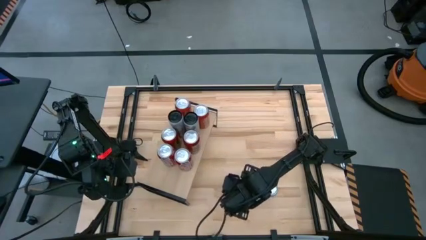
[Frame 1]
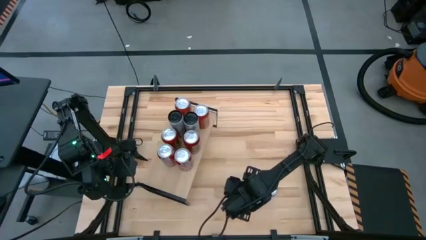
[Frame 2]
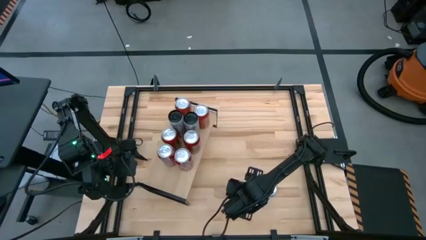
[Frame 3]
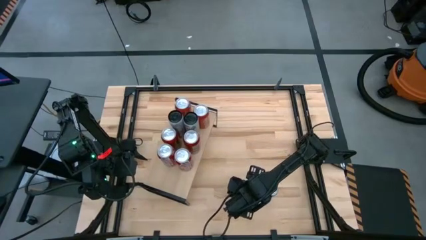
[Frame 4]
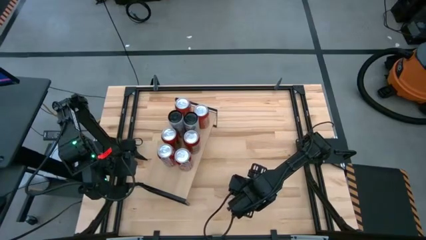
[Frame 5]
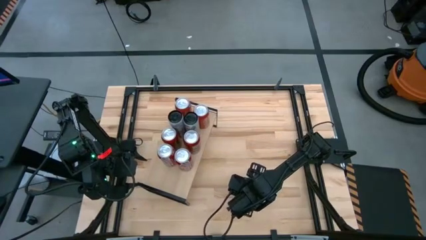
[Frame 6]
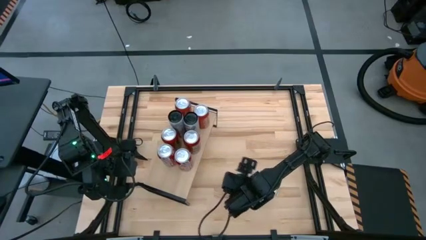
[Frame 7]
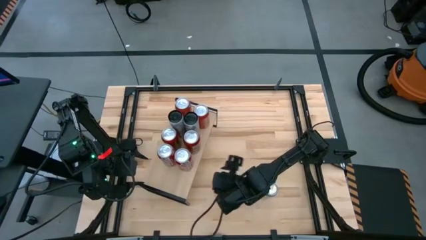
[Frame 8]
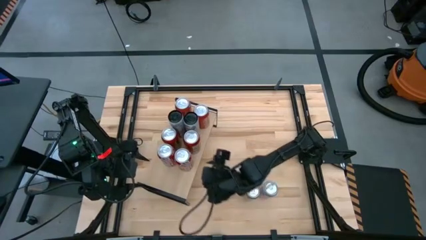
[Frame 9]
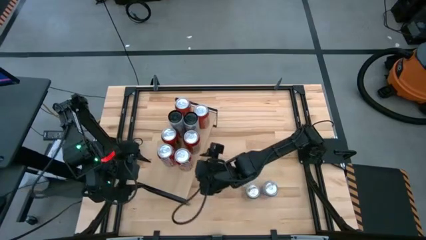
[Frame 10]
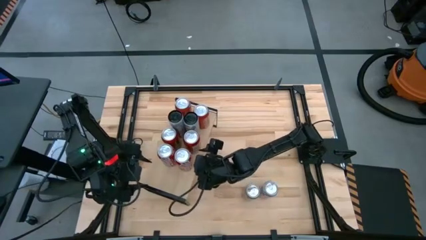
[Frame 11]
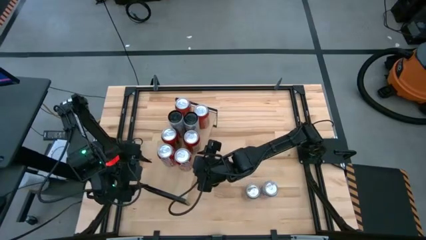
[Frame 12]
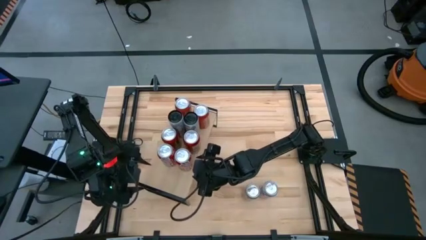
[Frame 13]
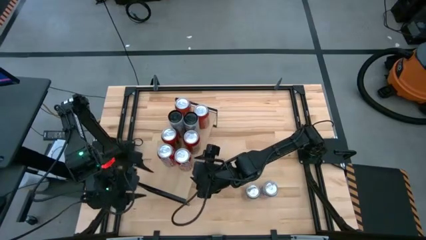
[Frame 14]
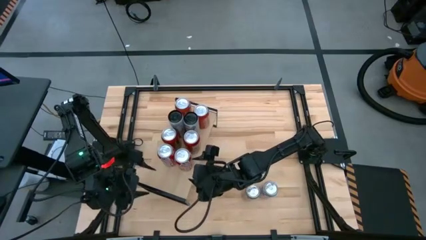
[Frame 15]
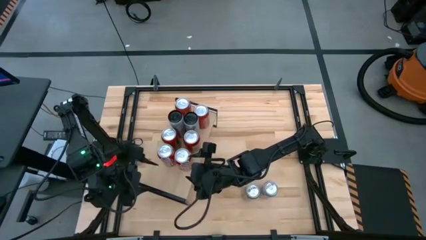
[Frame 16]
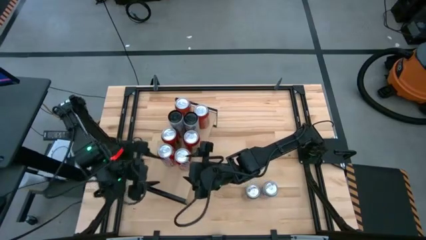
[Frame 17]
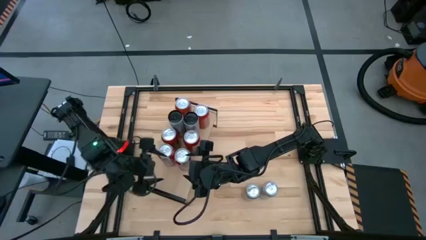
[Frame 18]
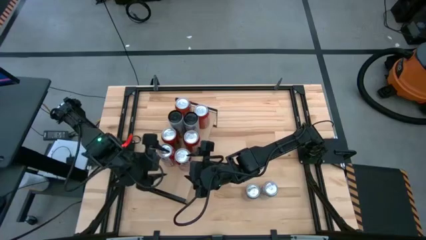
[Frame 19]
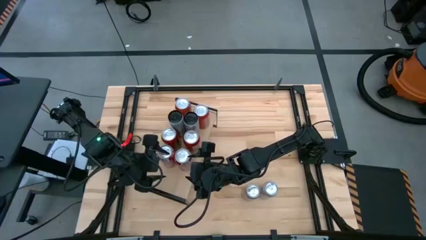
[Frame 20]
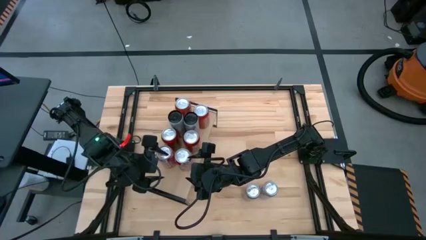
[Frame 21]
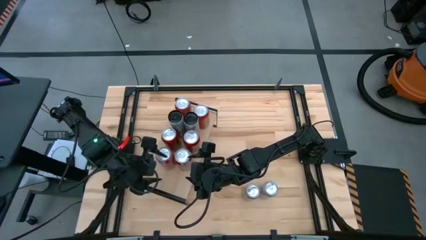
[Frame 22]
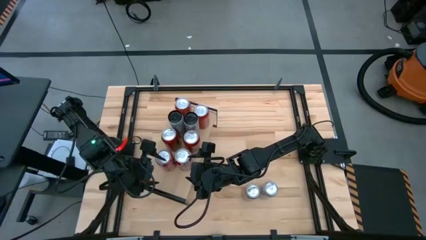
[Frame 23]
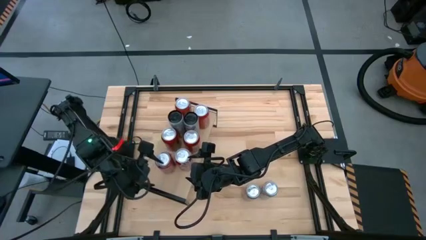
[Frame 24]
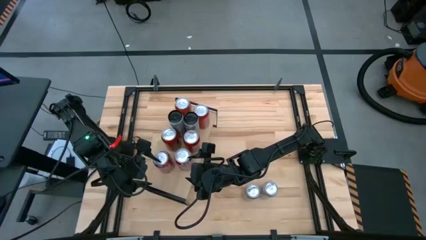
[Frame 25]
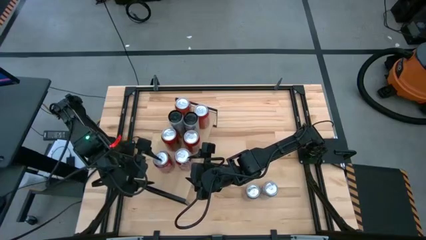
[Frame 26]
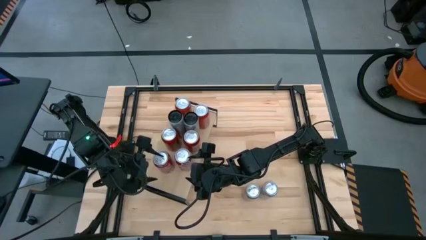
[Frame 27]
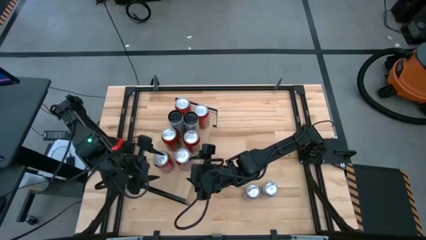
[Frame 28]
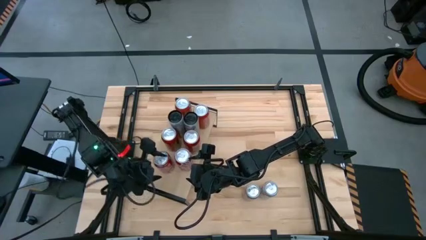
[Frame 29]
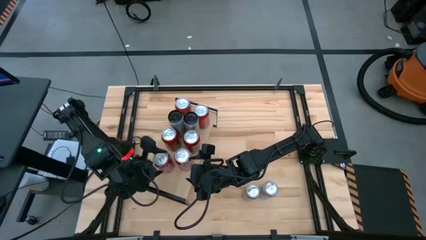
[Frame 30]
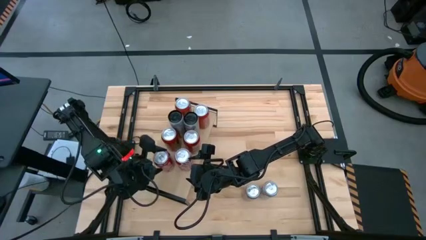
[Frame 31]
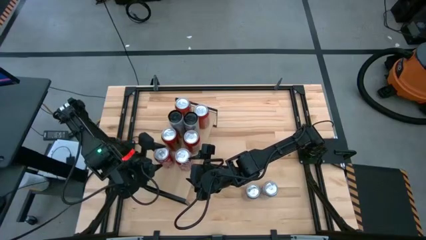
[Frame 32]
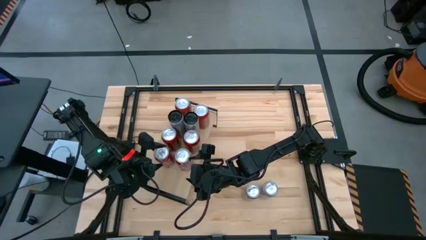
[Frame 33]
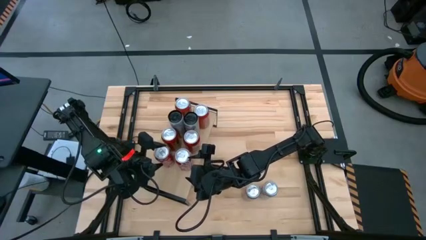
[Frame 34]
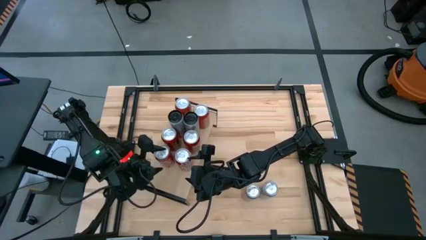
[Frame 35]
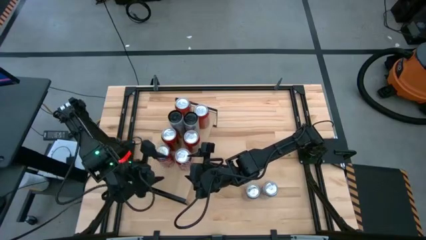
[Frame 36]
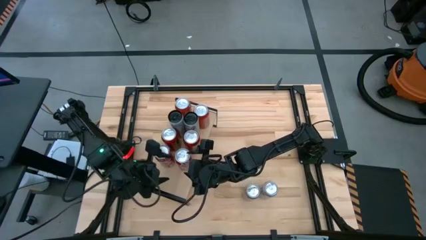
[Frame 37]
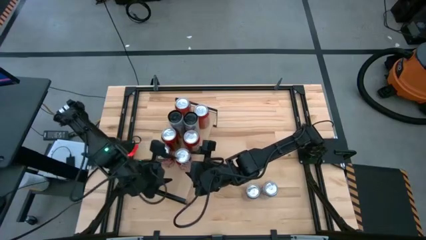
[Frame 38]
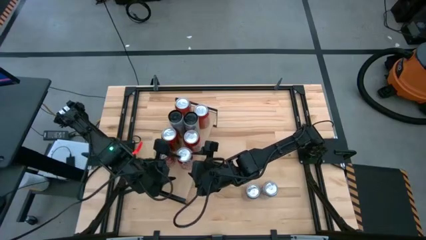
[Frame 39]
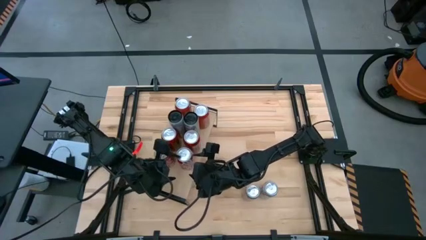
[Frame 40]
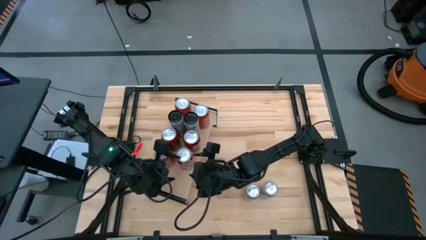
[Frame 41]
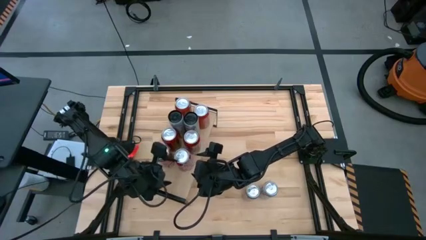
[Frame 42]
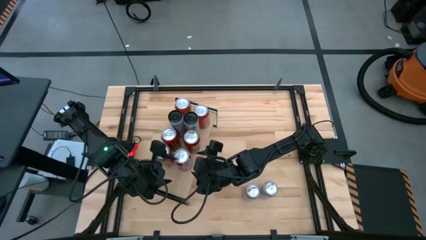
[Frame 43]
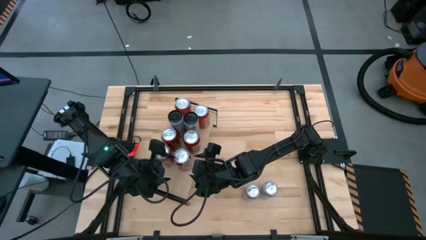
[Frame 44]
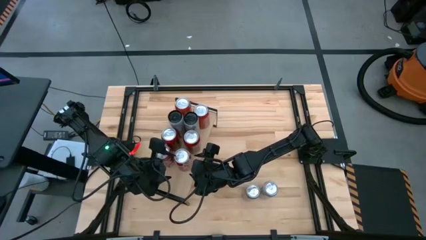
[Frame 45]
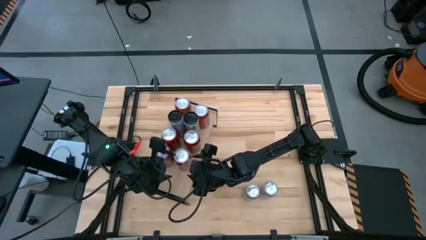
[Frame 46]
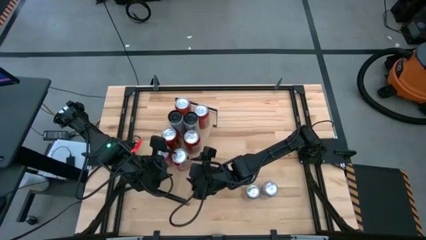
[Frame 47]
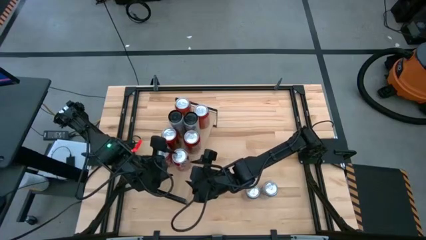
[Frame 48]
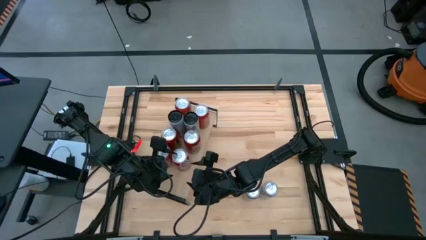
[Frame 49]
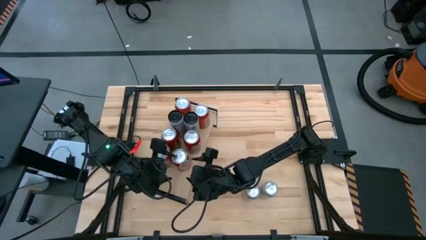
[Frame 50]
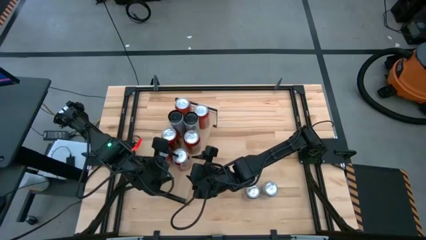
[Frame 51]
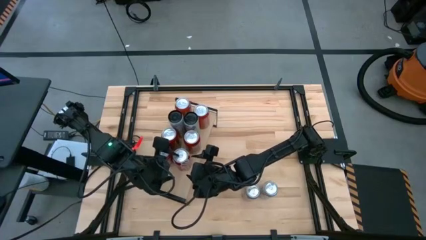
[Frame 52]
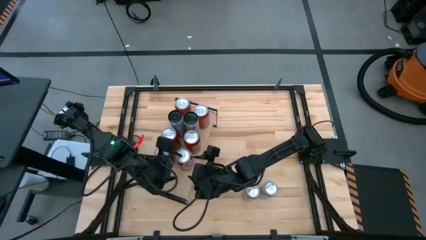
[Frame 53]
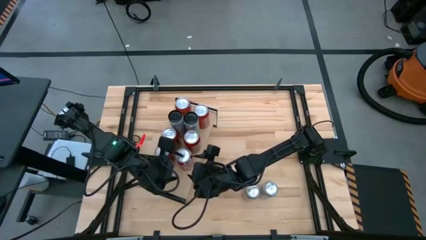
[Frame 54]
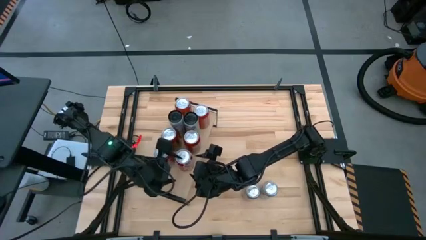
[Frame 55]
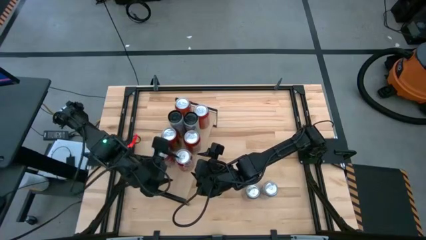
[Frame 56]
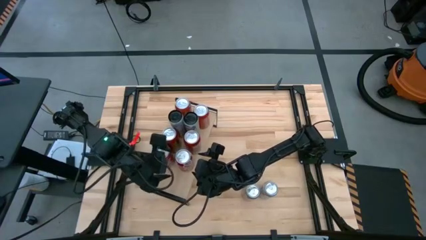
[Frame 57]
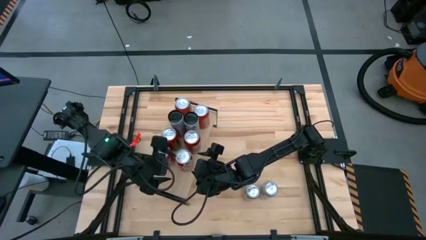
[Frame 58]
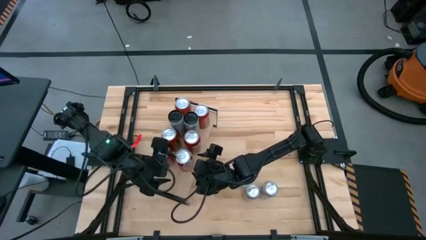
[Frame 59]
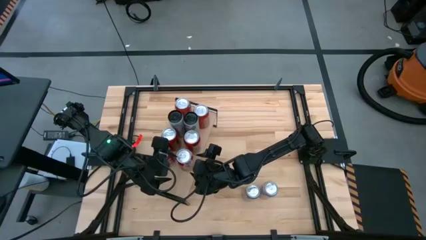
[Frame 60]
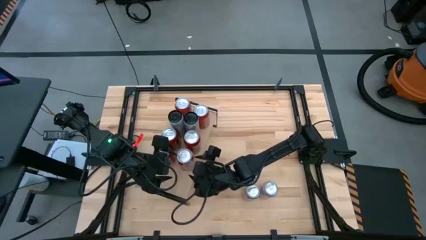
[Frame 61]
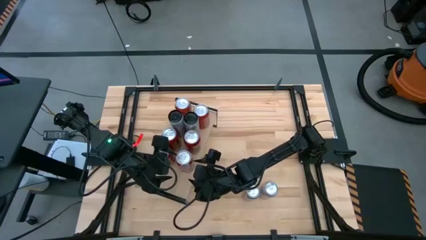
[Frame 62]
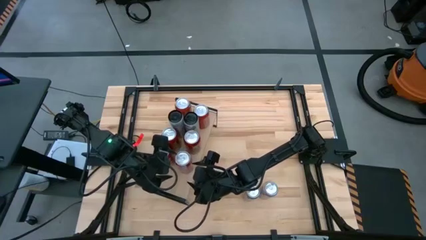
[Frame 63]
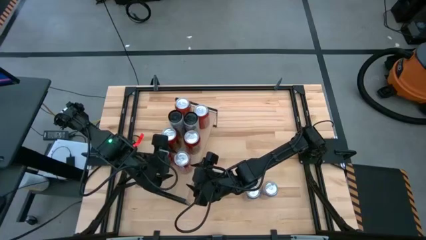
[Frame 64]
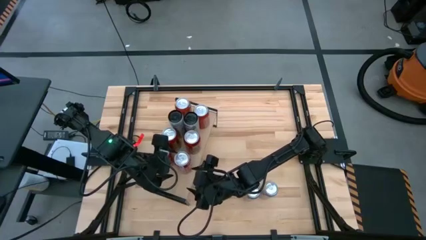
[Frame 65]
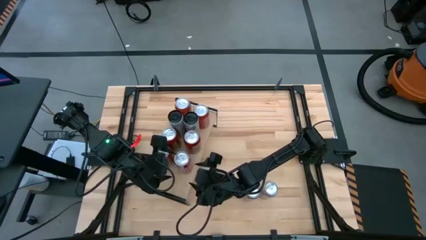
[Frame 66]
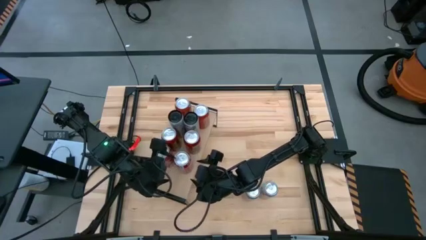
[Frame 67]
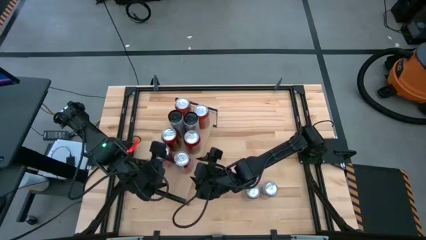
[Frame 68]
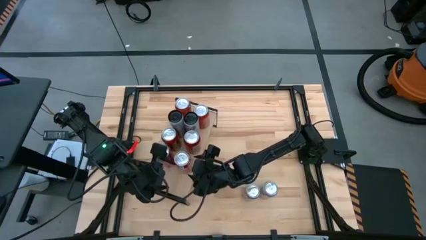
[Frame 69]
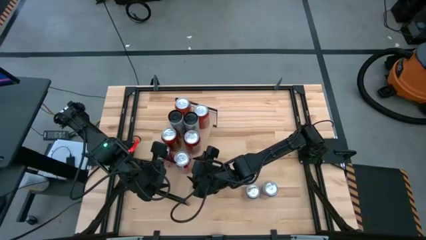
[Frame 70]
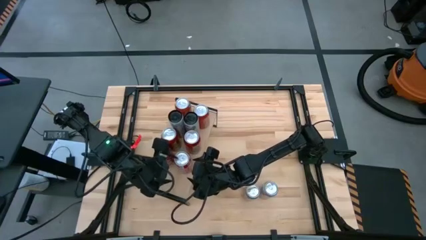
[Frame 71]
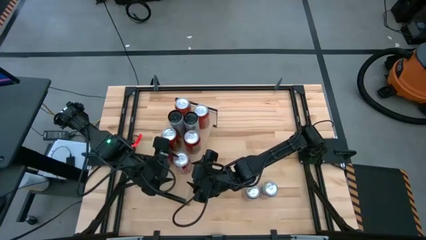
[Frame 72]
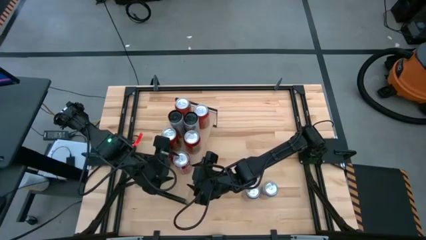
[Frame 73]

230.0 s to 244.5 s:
Task: Place canned beverage on shelf
Put the red soda can on the shelf

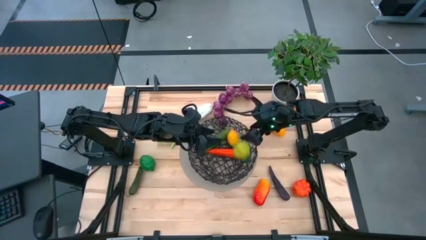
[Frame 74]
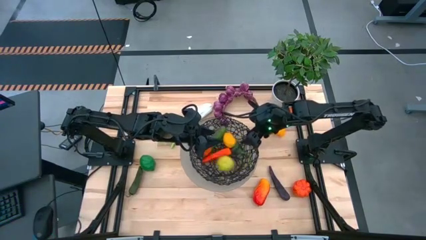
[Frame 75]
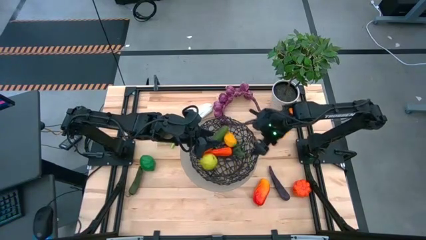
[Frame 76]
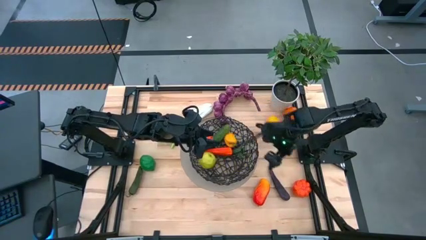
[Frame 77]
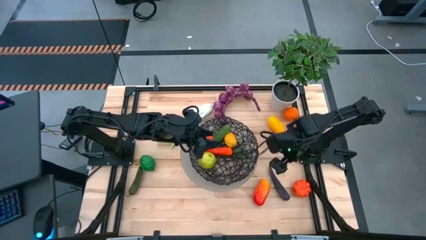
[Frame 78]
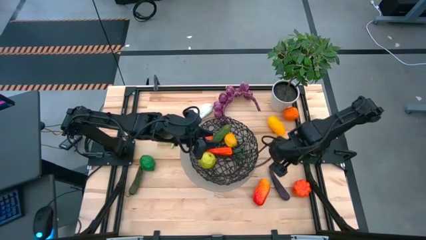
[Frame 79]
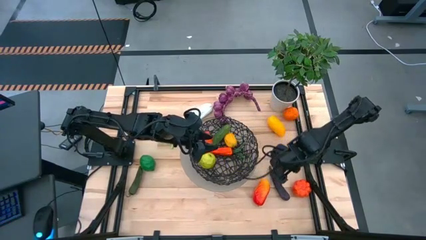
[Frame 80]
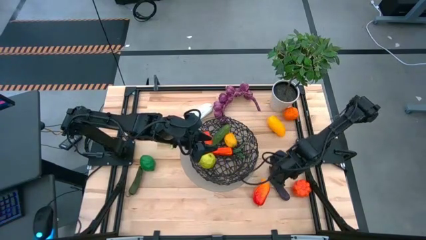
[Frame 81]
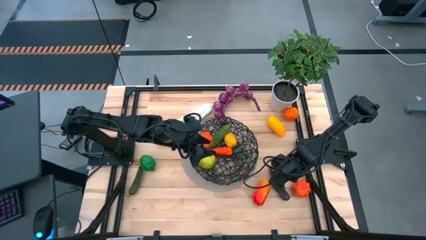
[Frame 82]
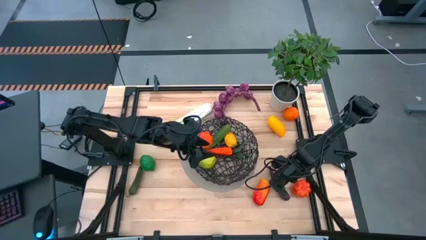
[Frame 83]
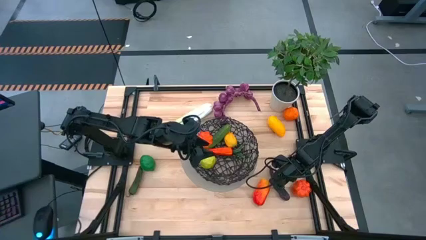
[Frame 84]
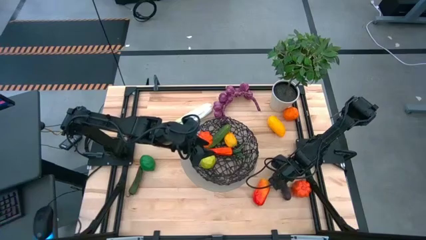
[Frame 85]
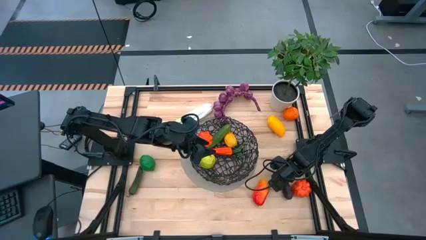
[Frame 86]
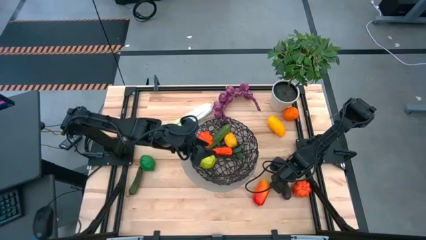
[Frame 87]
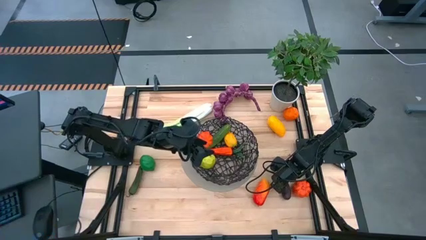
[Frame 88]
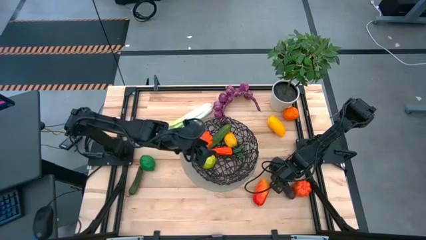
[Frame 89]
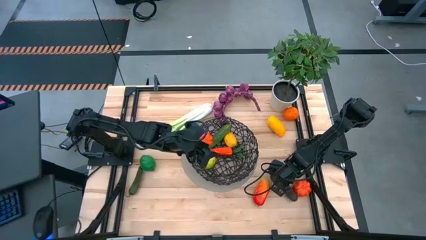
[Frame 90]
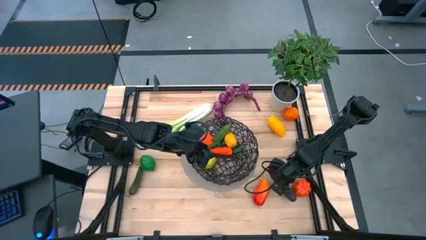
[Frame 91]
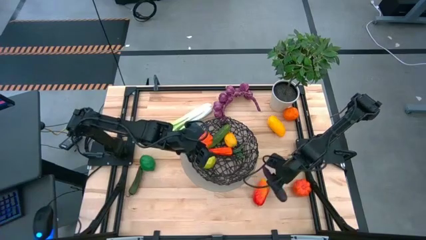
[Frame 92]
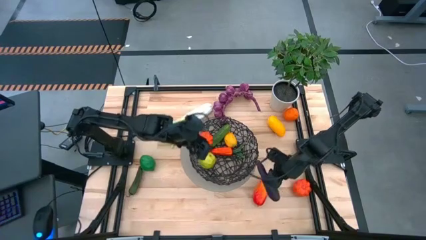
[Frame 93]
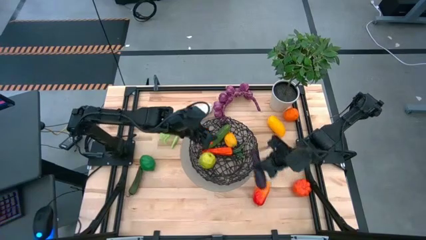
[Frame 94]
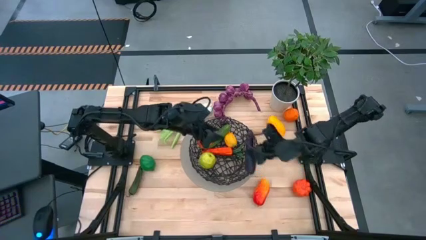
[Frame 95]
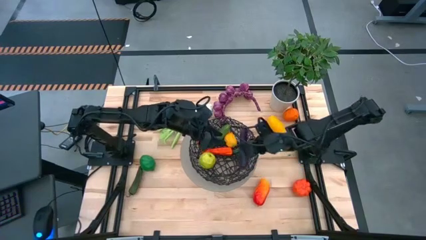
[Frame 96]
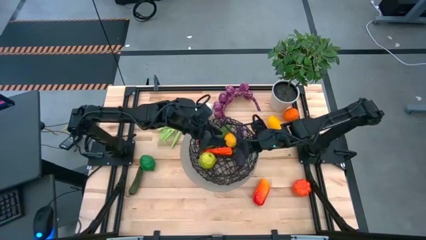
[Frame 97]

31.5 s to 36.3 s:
Task: Build produce basket
Put the violet eggplant into the black wire basket
